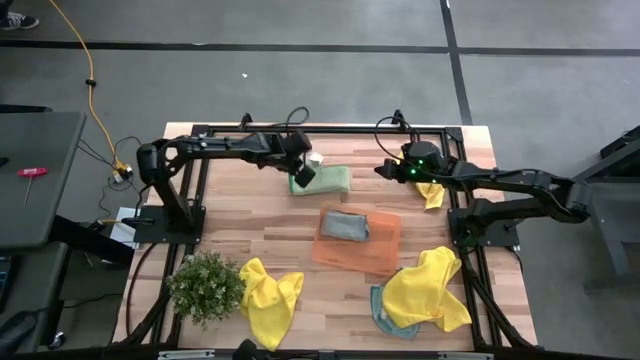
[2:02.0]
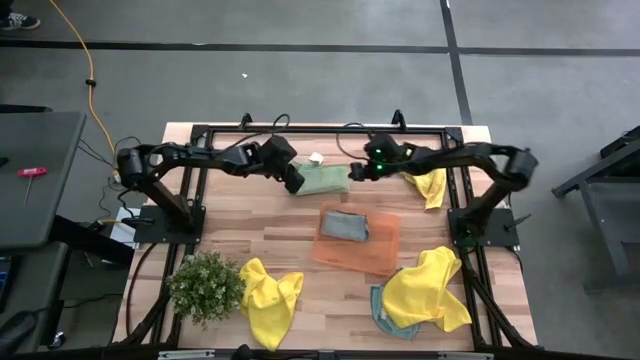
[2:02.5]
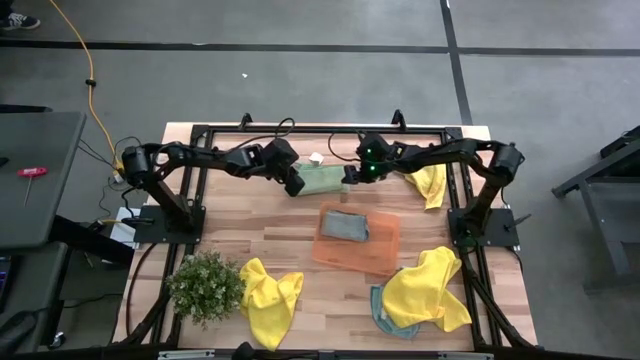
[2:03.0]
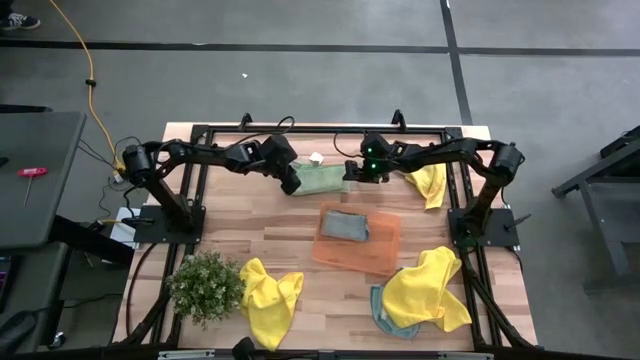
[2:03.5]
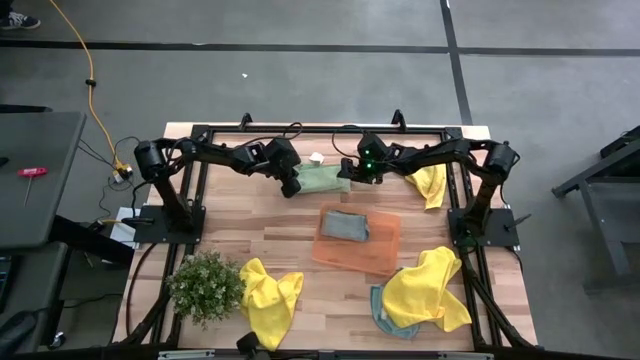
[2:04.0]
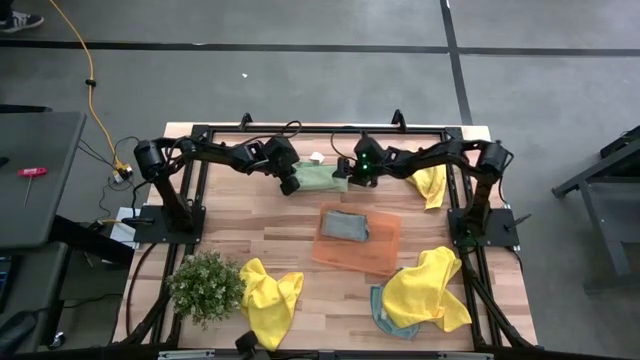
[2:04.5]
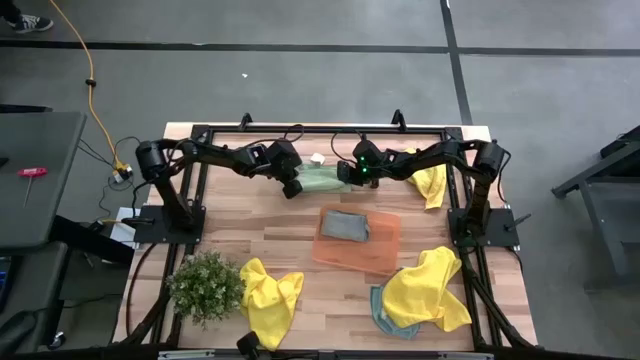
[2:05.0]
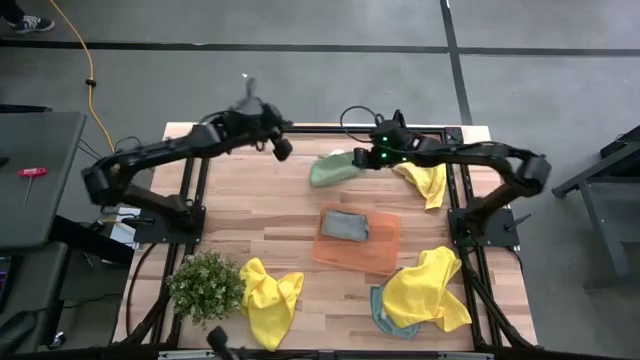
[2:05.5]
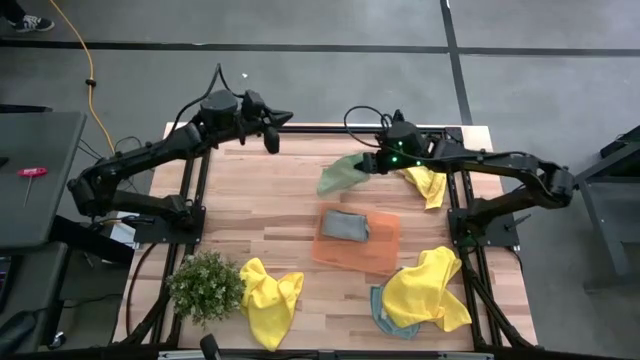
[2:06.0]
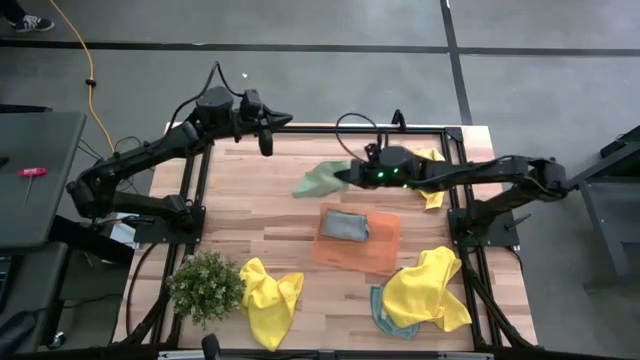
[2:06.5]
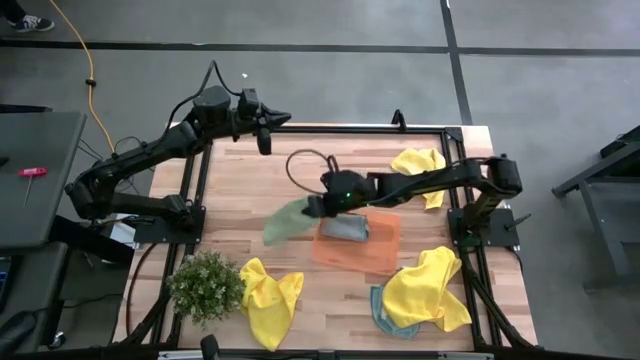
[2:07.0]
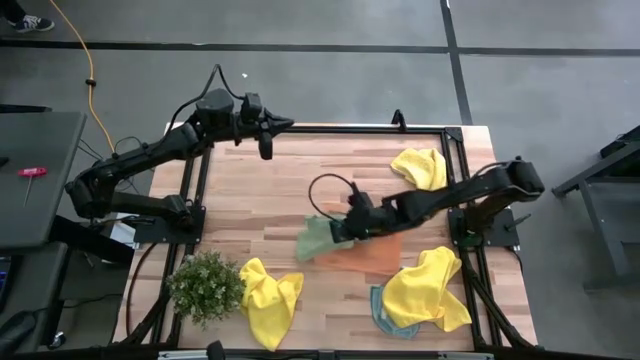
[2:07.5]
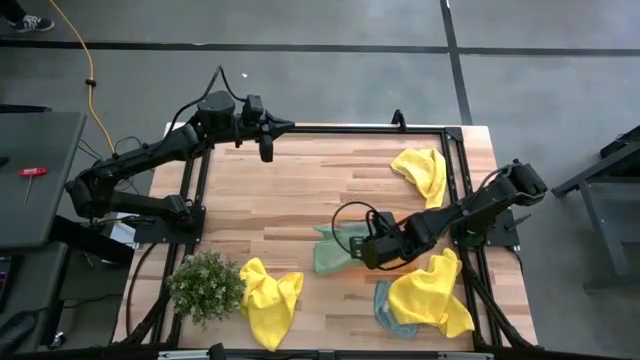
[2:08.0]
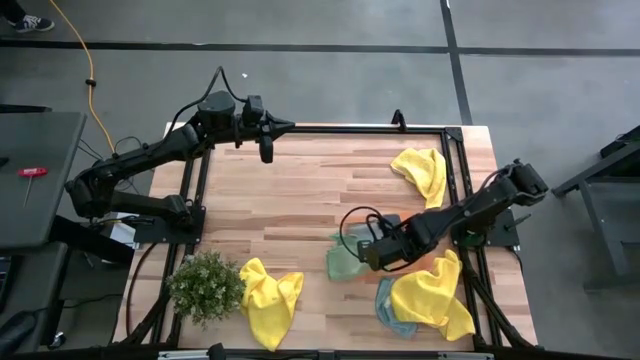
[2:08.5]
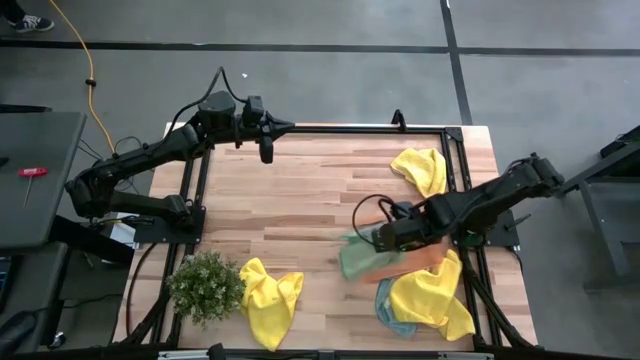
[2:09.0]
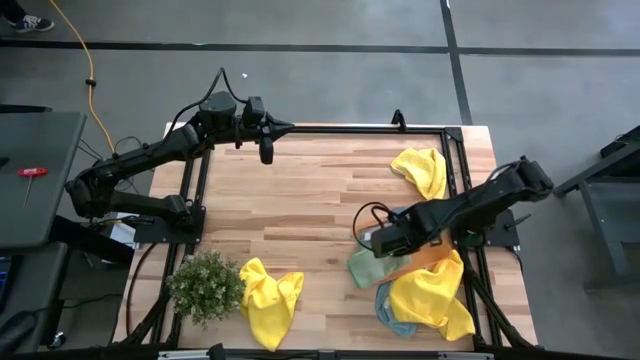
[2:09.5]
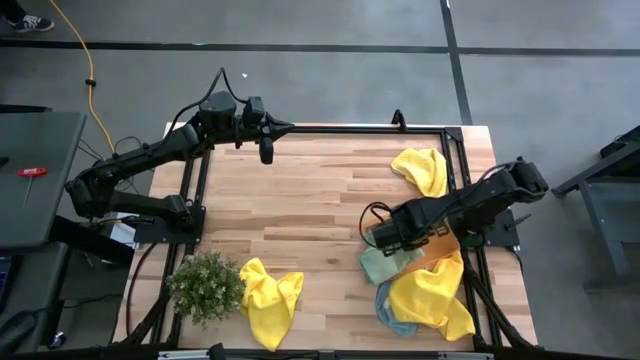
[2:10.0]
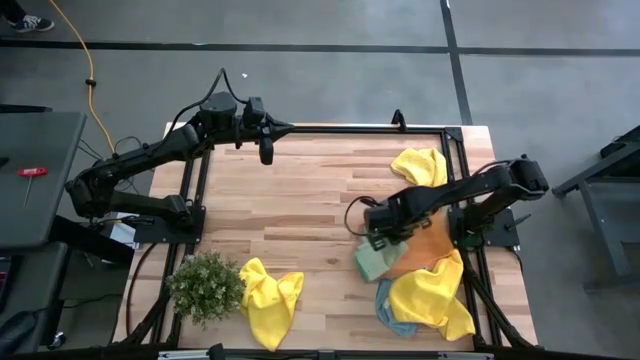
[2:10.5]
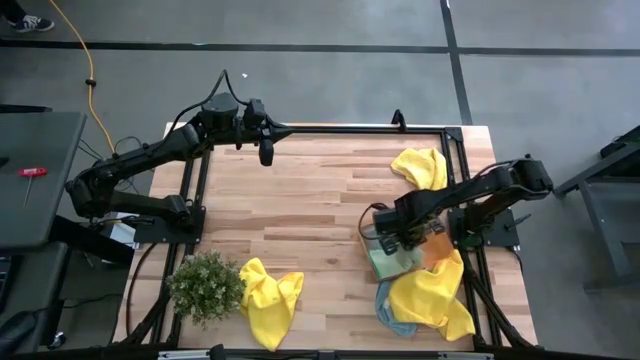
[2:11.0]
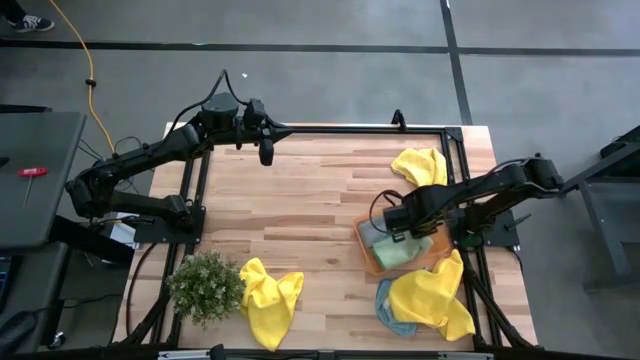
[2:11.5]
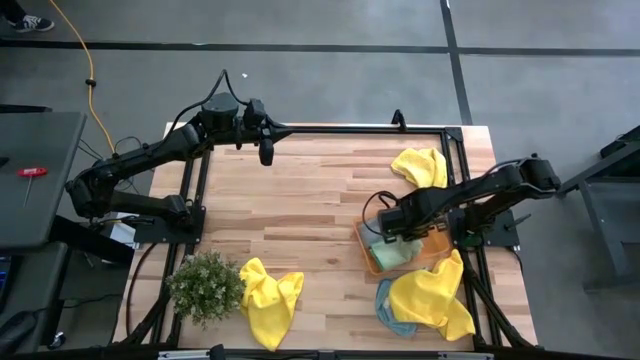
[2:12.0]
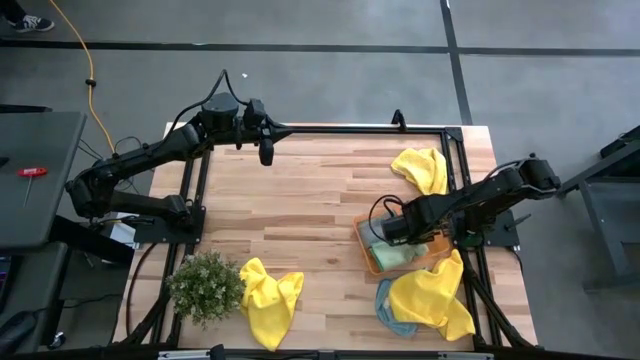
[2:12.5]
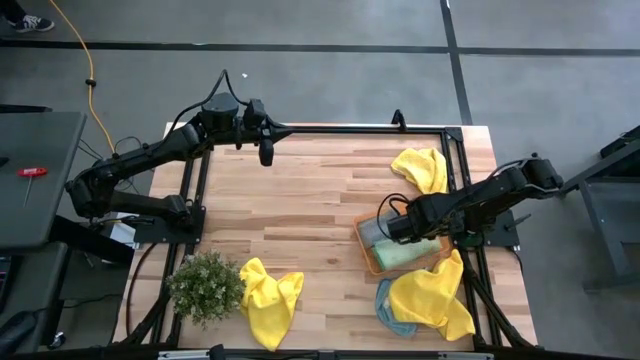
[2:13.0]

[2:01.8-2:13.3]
Task: Fold microfiber towels
Put the green microfiber towel into the orange bin

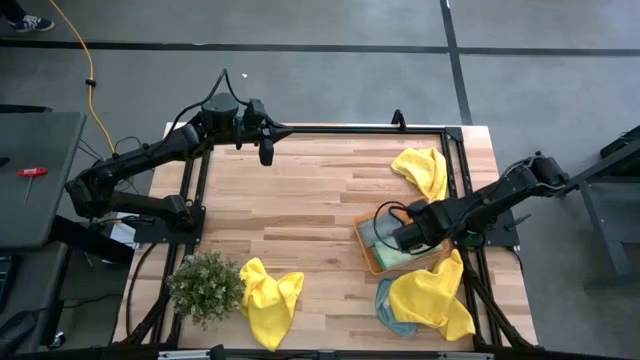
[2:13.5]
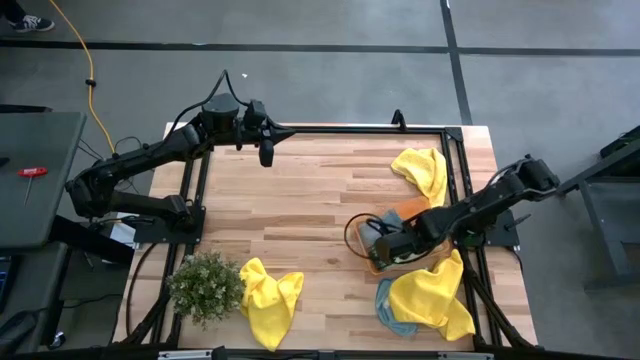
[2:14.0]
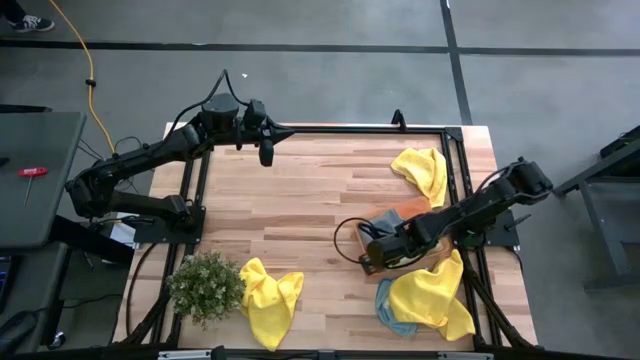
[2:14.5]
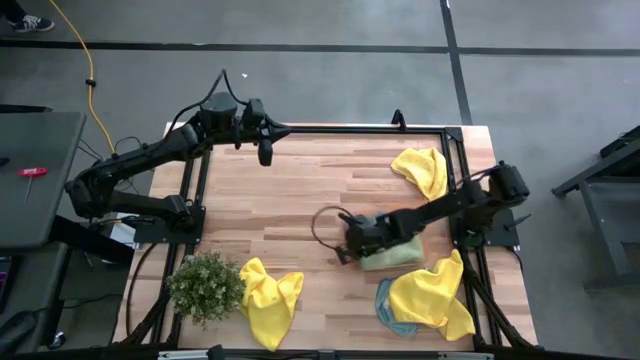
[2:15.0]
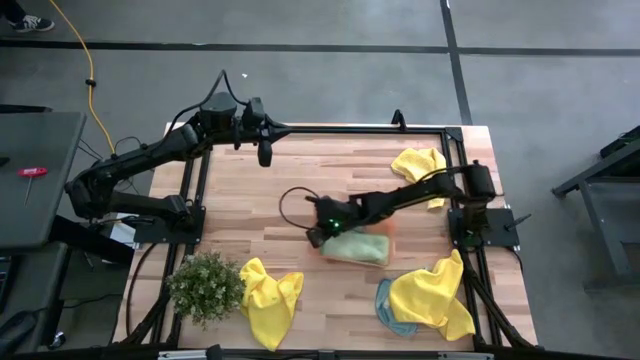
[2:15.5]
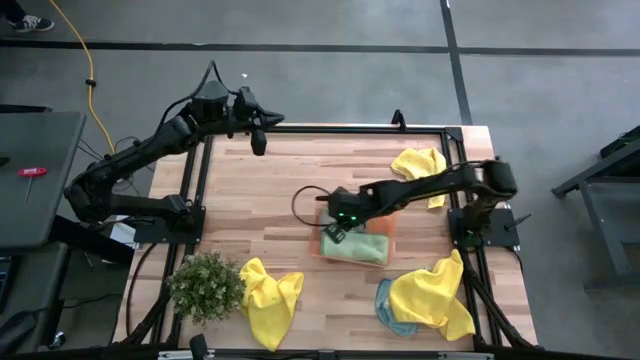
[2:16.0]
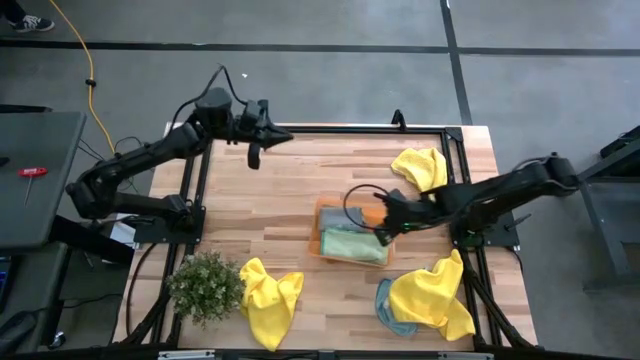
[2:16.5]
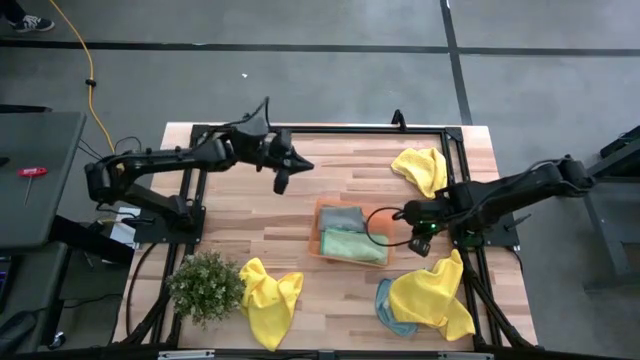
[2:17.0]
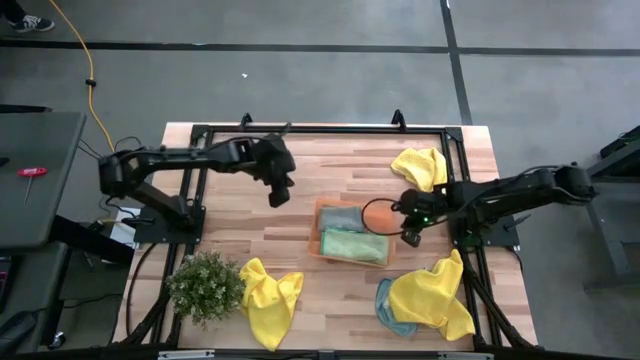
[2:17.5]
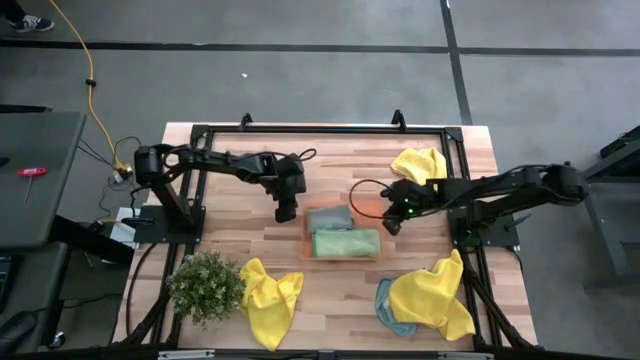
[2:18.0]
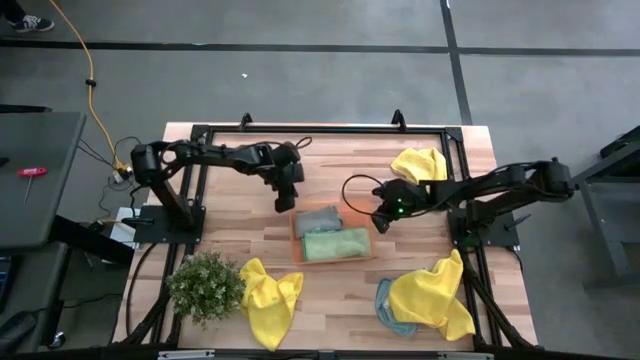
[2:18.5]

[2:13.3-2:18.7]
Move the orange bin to the center of the table

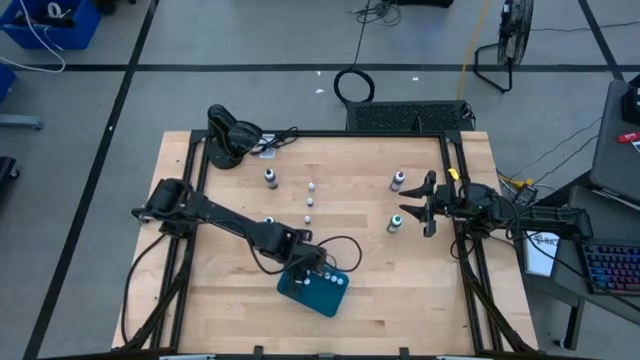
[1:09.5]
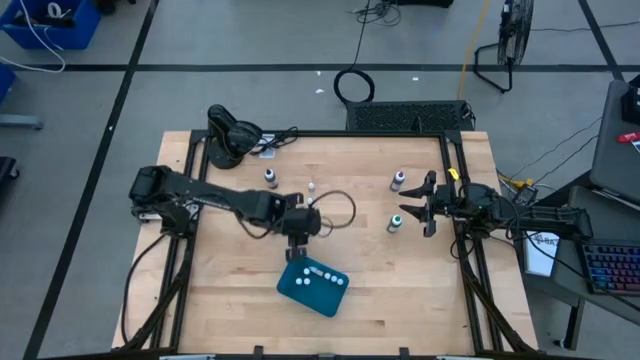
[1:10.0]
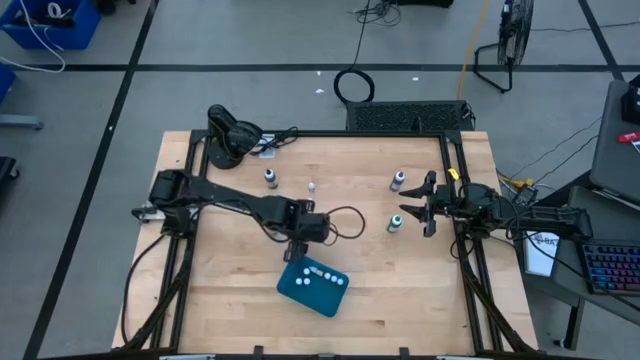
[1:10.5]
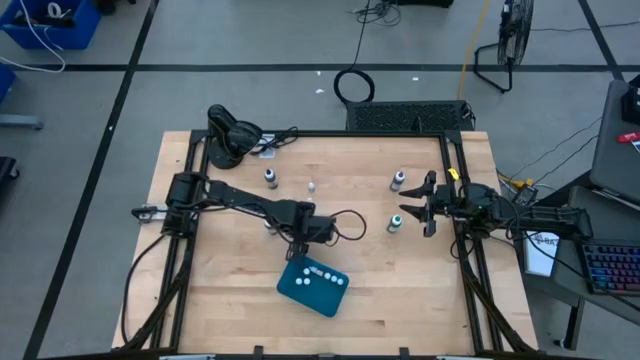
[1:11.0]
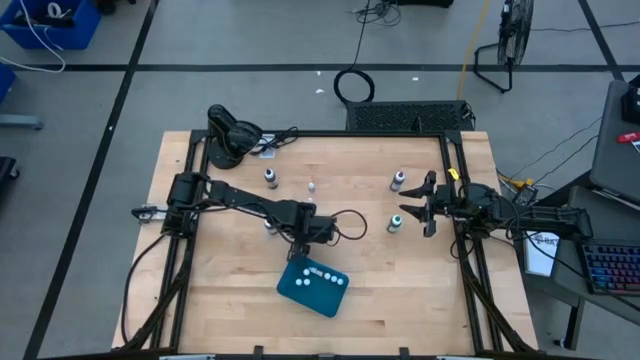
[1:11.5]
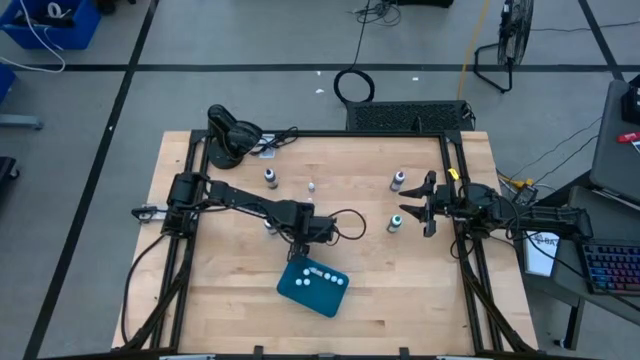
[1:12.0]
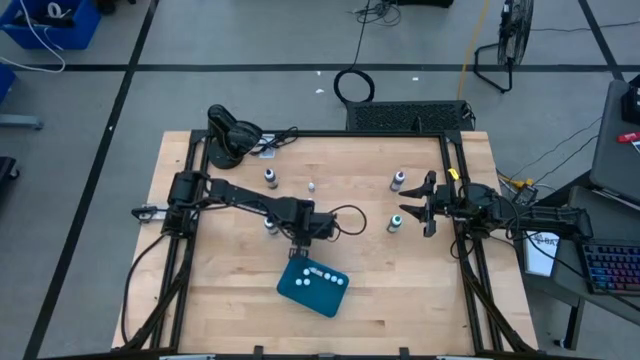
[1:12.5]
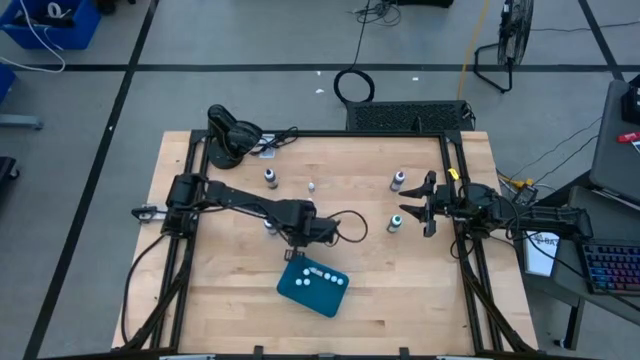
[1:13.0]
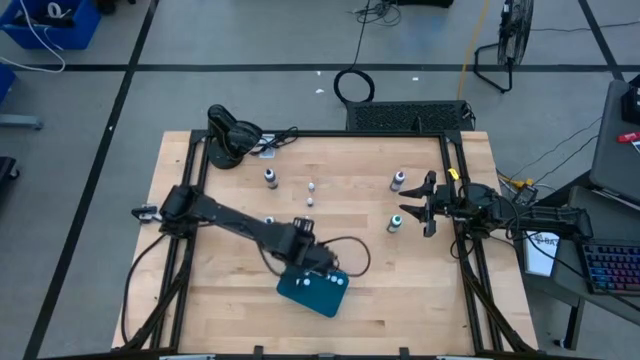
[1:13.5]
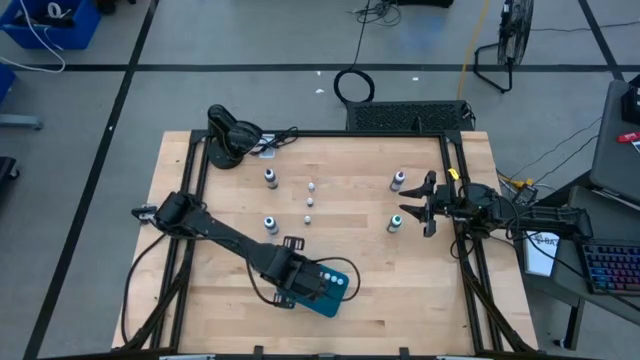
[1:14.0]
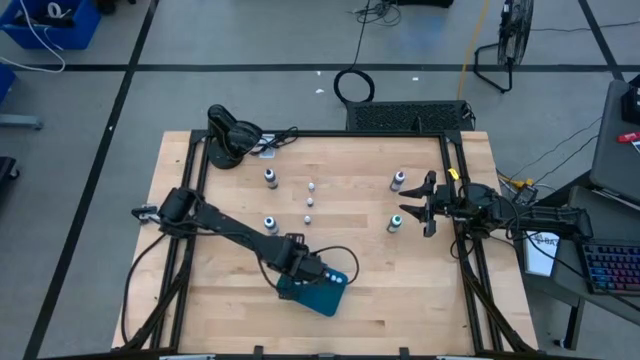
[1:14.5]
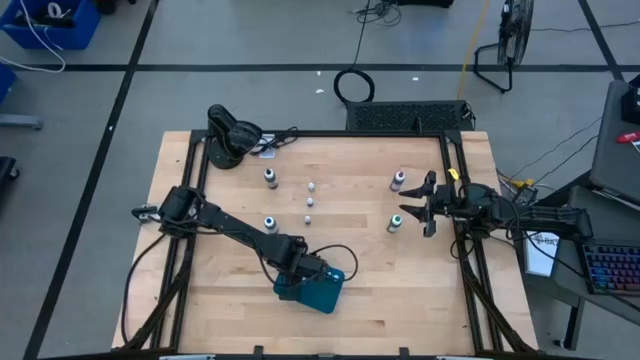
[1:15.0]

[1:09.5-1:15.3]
Task: Pick & Place food coloring
Put the small orange coloring bottle into the blue bin
